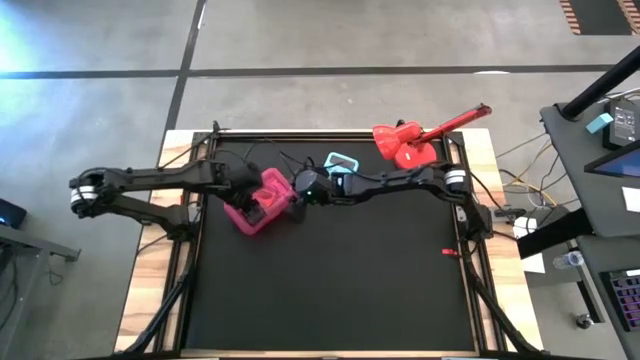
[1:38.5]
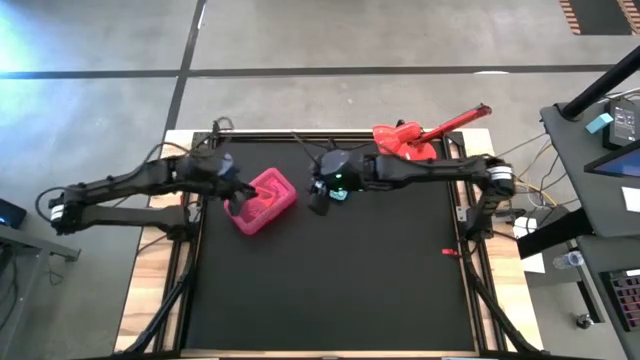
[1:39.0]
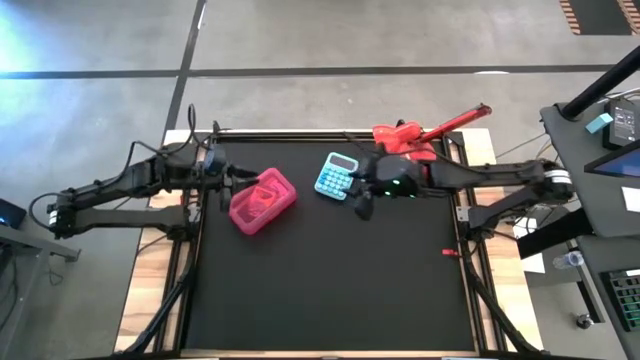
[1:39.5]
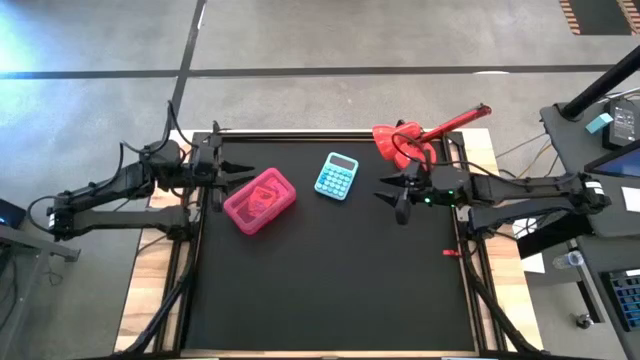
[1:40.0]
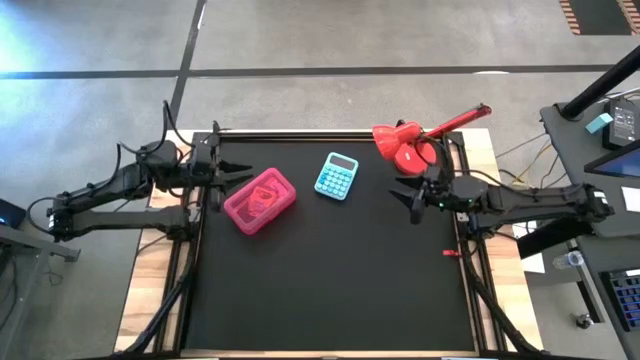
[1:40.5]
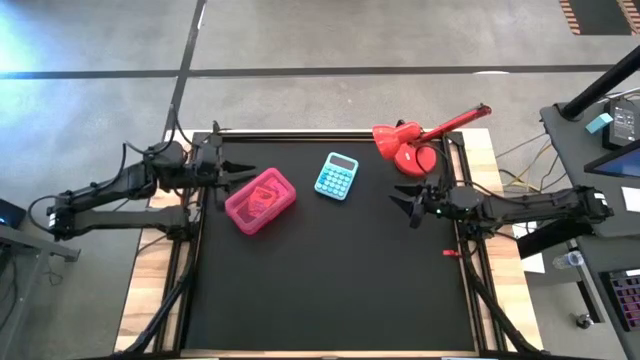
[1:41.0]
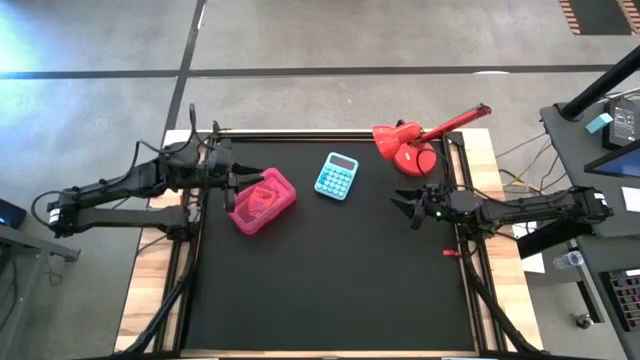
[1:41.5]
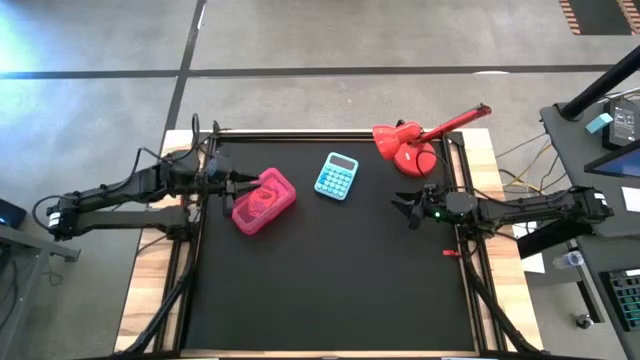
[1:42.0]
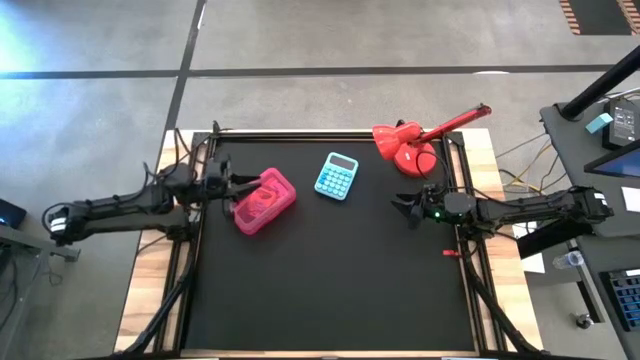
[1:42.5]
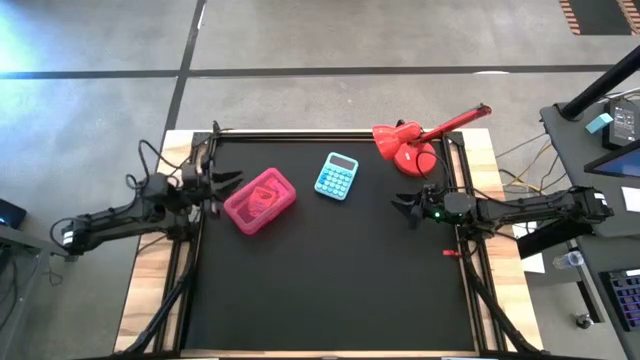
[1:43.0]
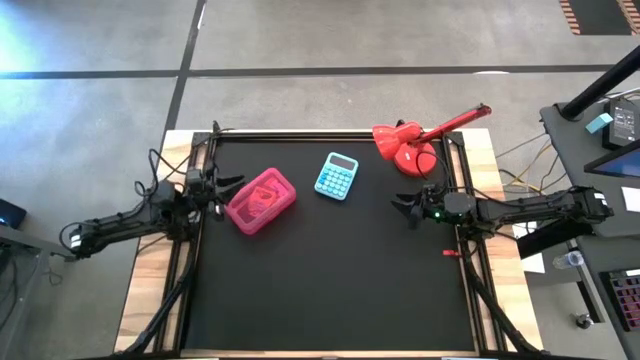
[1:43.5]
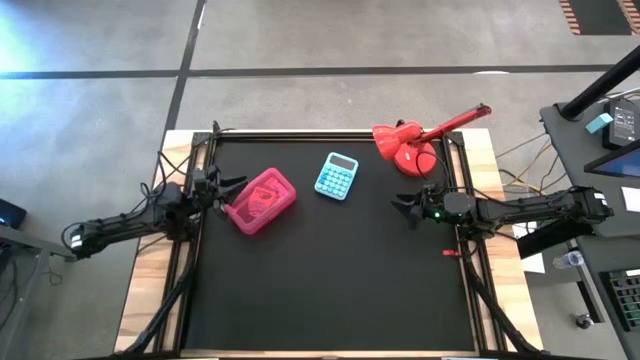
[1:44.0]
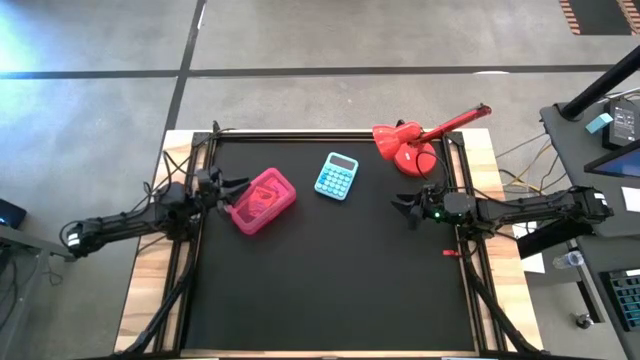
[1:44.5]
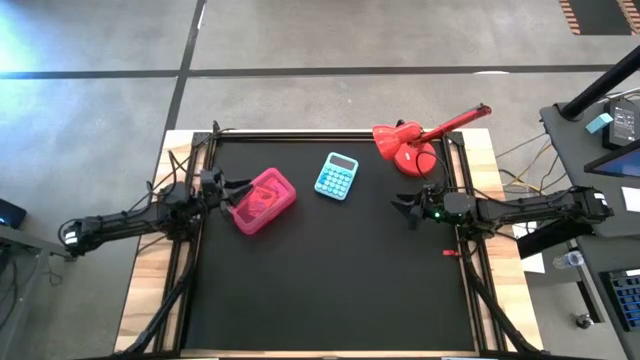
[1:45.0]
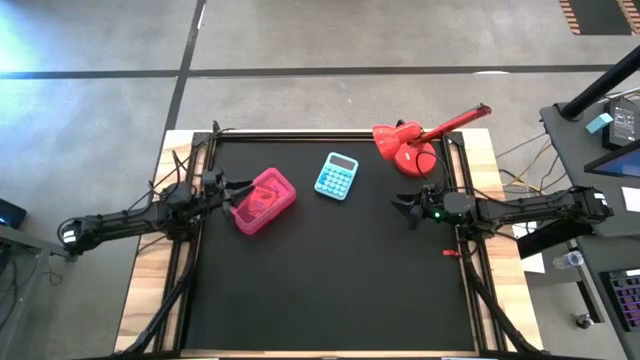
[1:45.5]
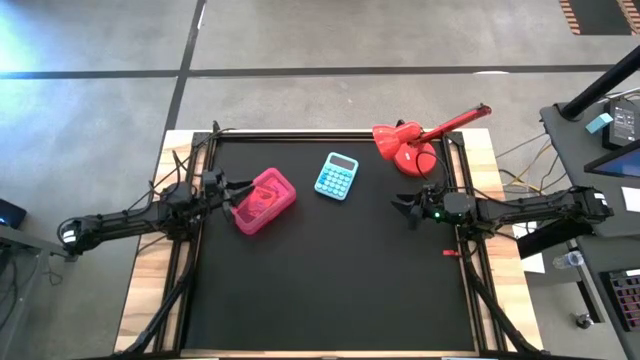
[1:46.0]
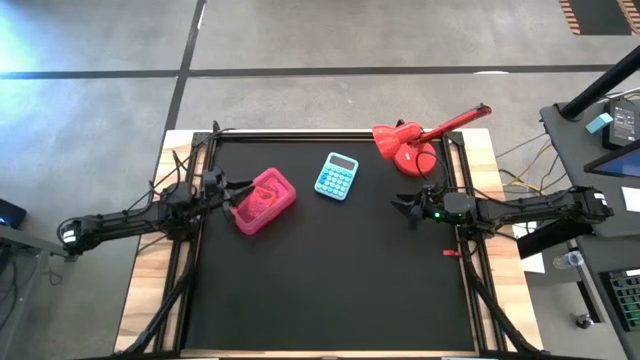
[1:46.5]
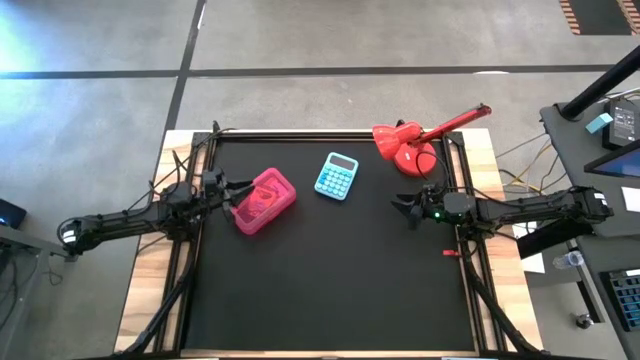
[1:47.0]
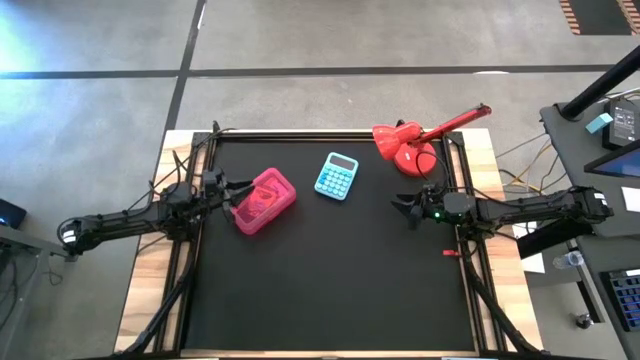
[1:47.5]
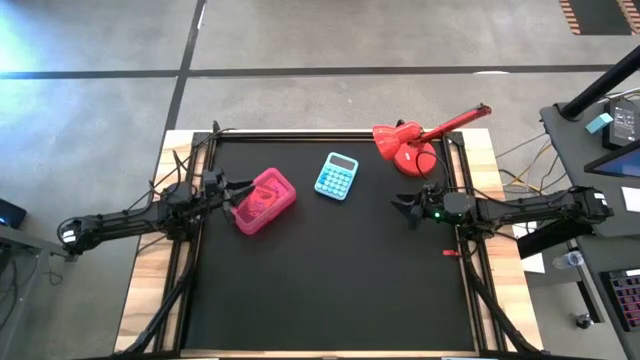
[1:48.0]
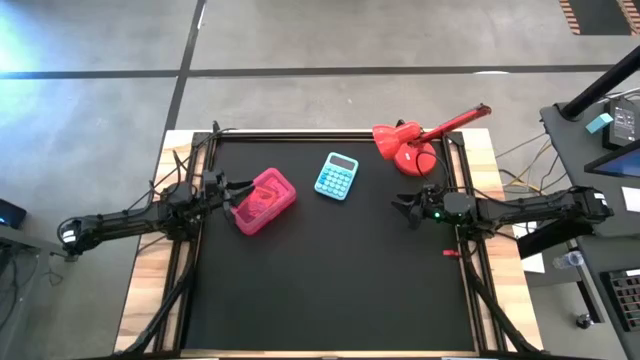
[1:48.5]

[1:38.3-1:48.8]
Task: Pack school essentials
Return to Home Position

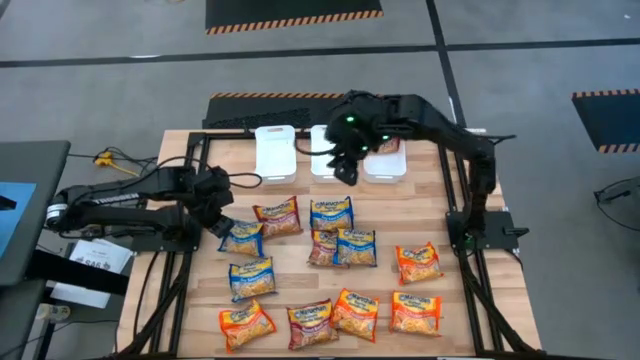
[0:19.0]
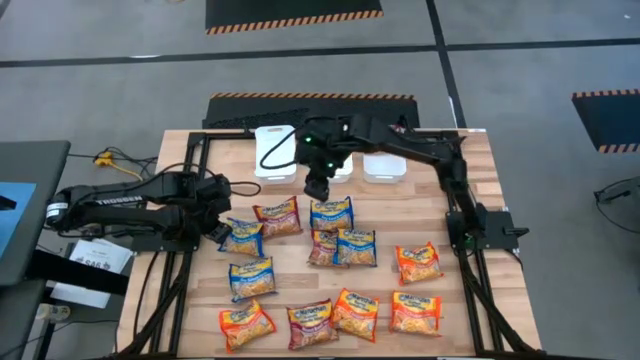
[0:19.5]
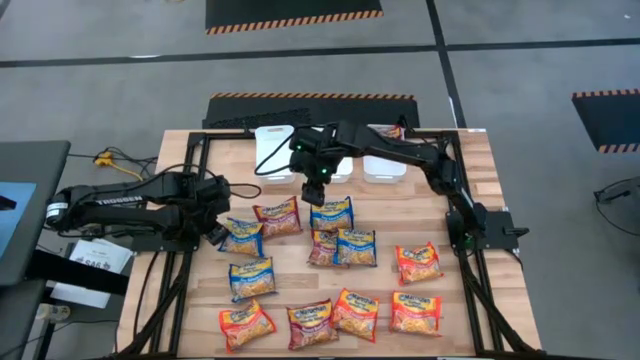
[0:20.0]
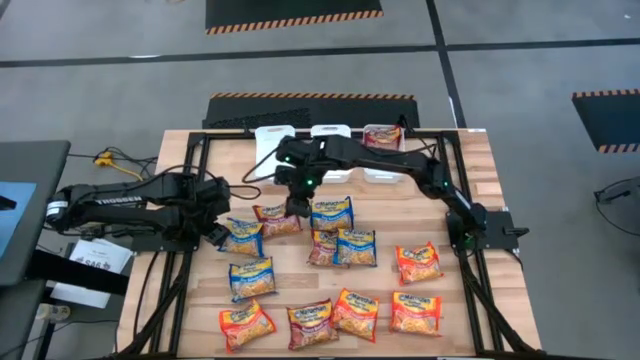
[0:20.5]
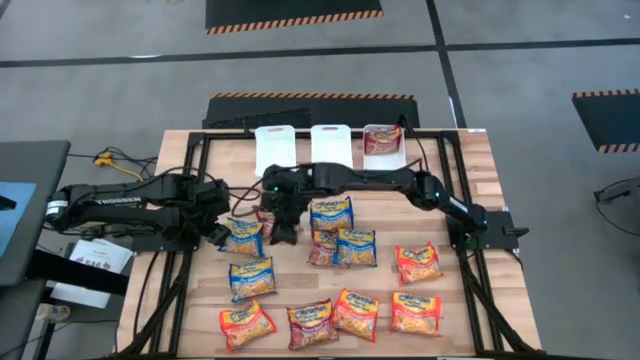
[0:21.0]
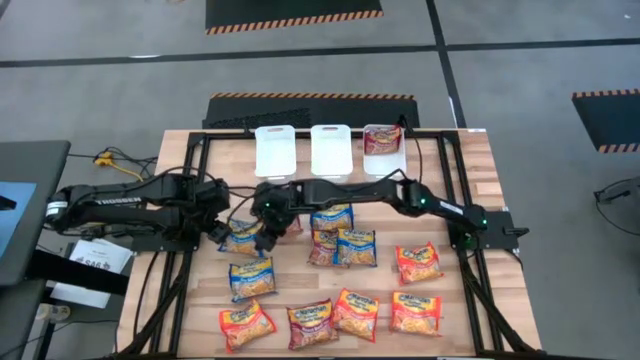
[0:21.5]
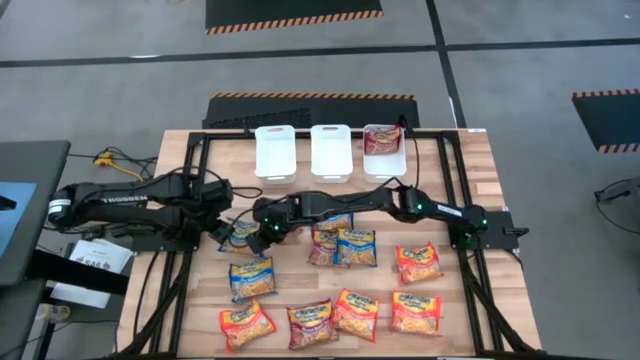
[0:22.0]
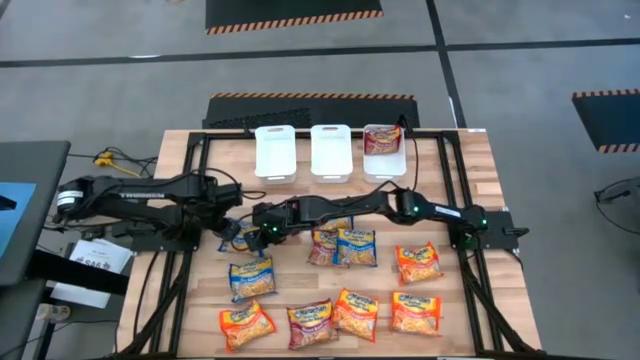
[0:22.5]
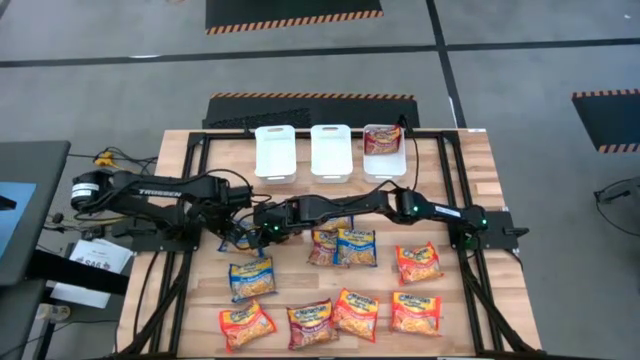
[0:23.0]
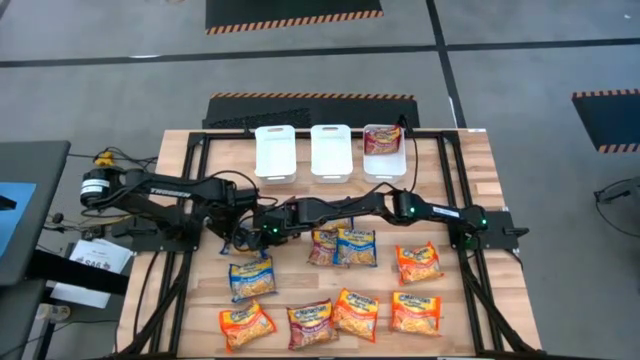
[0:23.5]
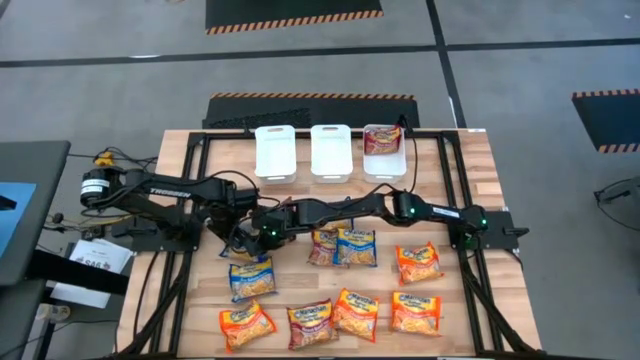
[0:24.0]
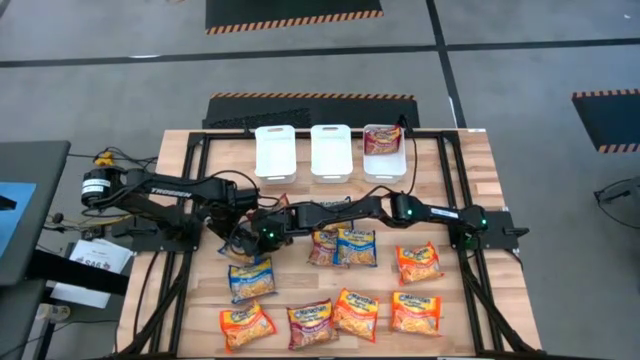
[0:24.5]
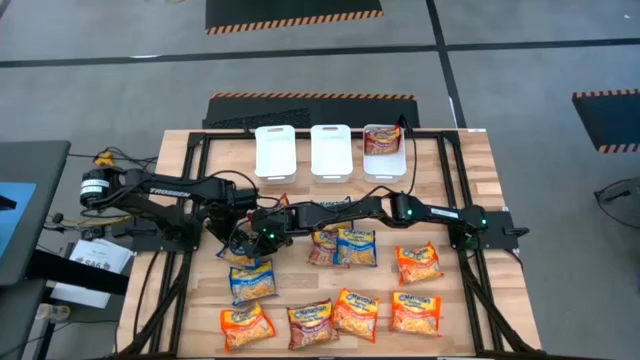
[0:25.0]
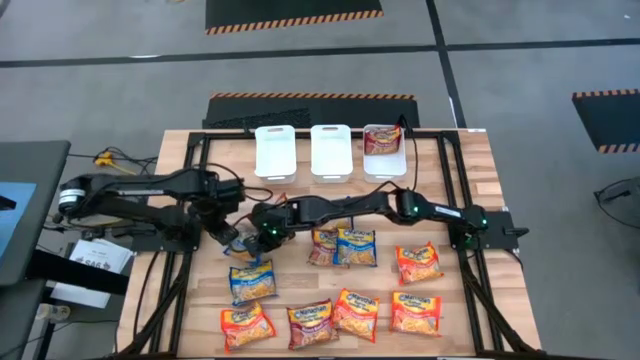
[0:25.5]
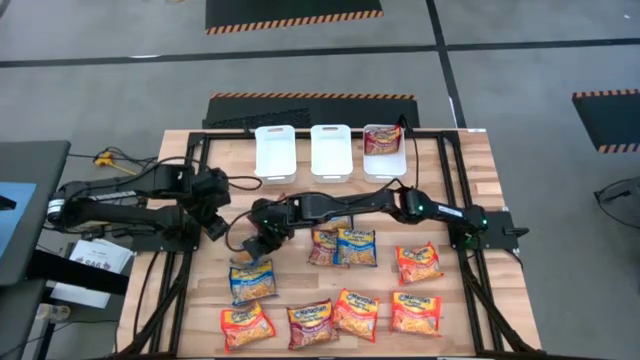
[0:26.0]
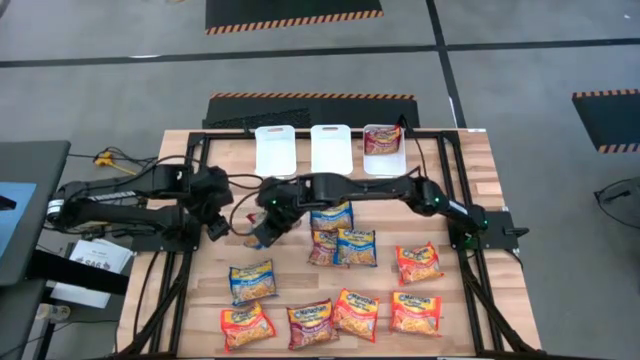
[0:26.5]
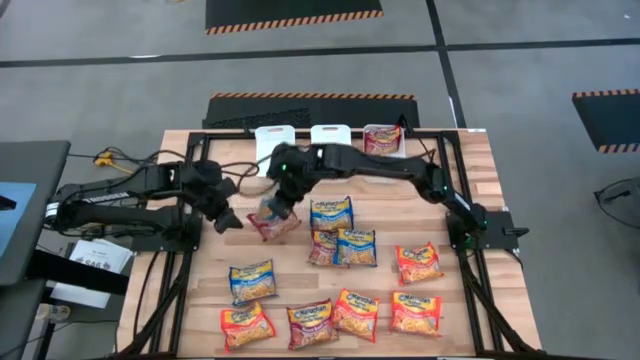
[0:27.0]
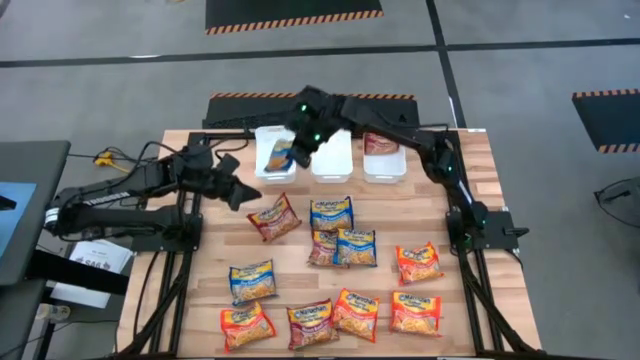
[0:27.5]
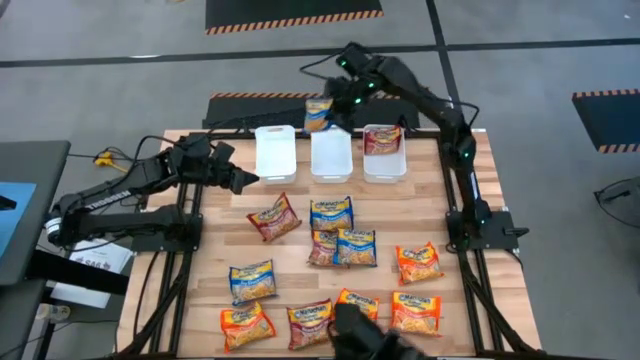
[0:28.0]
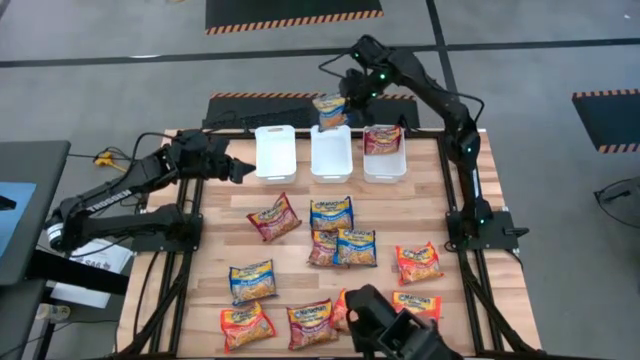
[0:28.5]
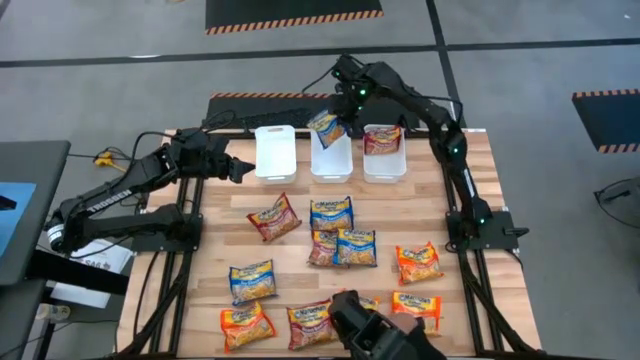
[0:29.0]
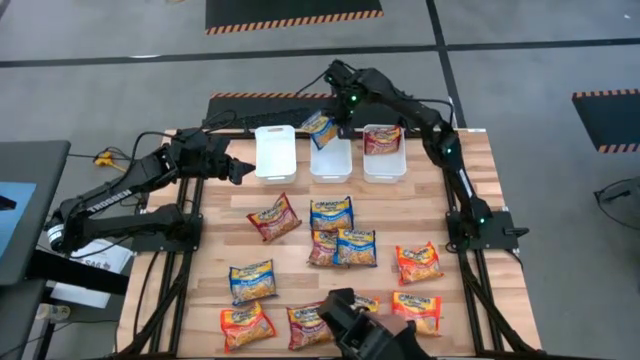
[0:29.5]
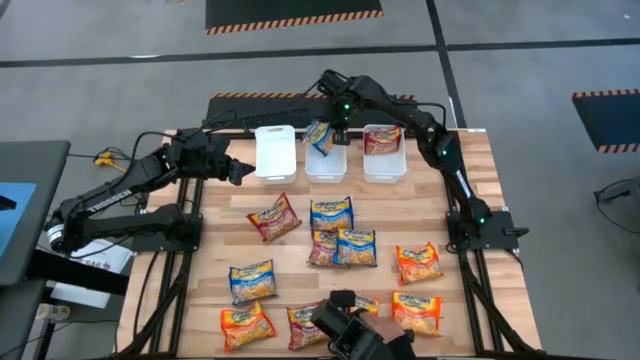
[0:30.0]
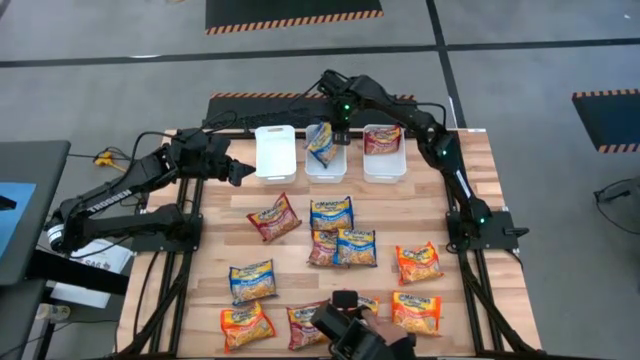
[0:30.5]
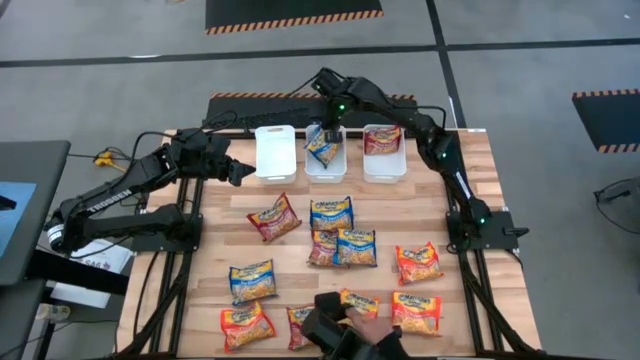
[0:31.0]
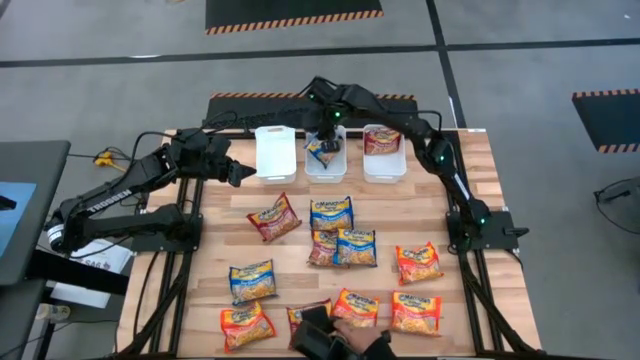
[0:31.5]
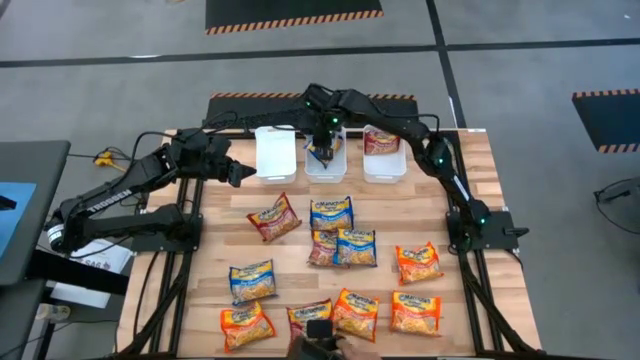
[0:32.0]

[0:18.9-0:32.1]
Task: Sort Maruchan noodles
Put the top left blue noodle soup pack into the middle white bin
